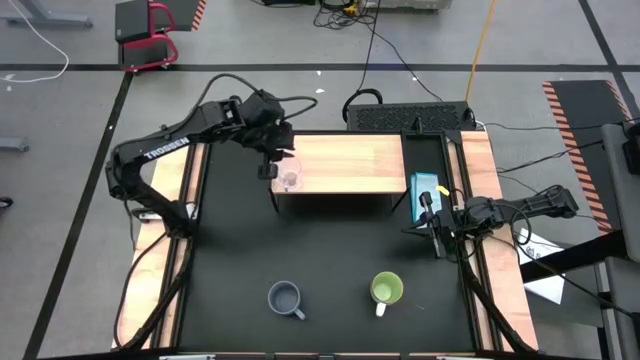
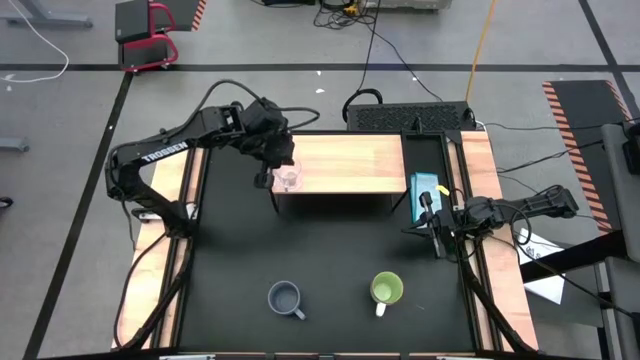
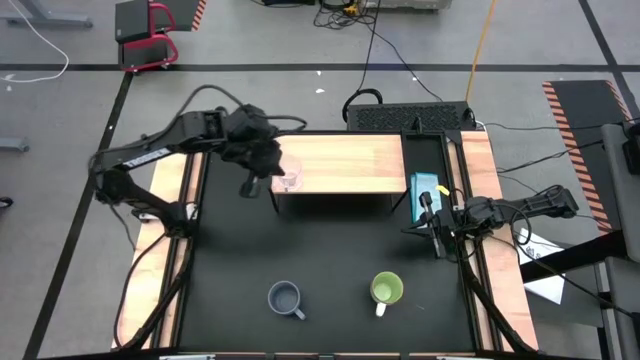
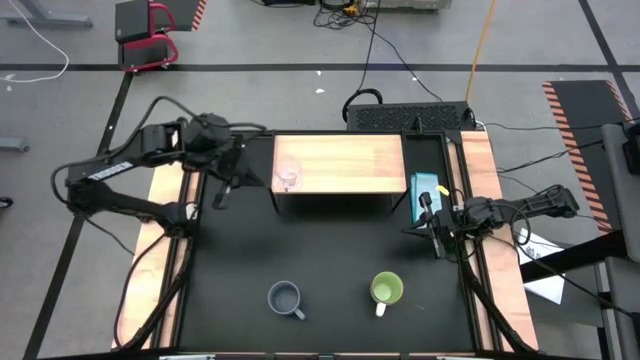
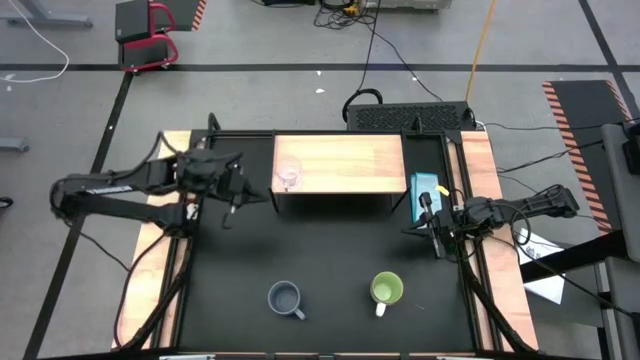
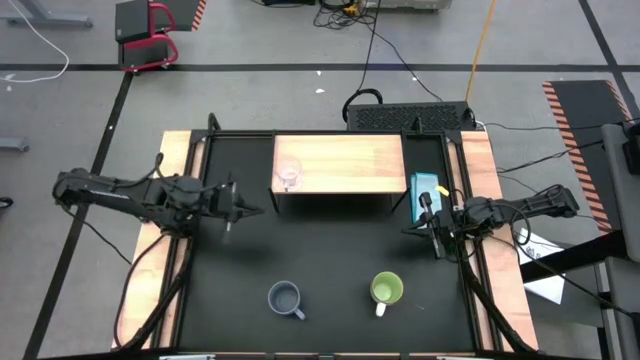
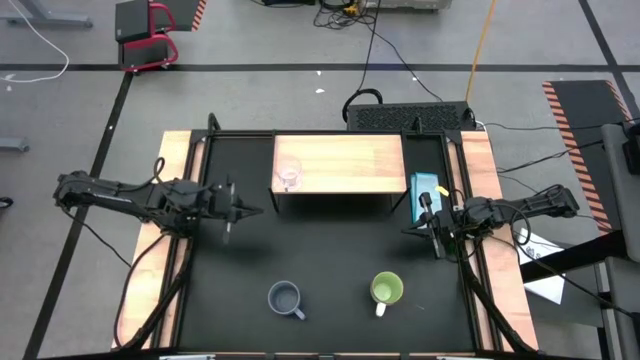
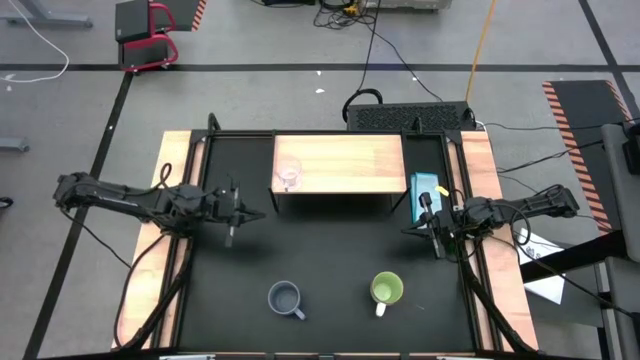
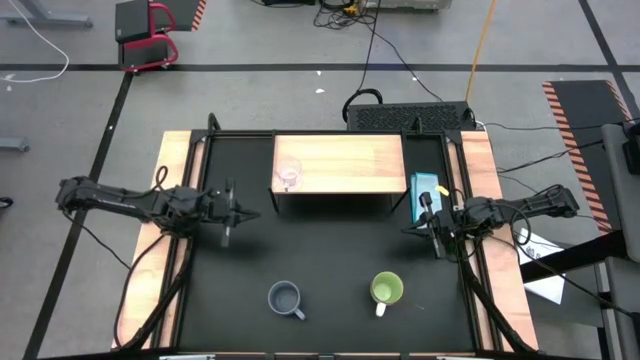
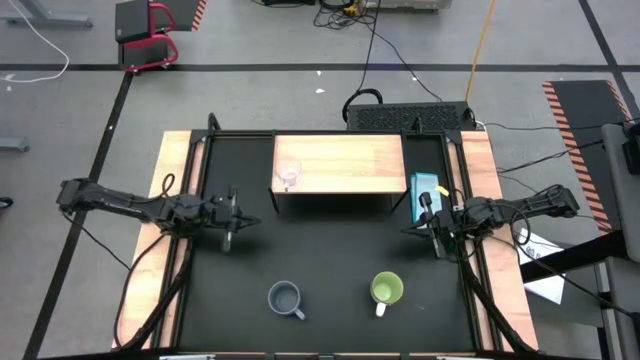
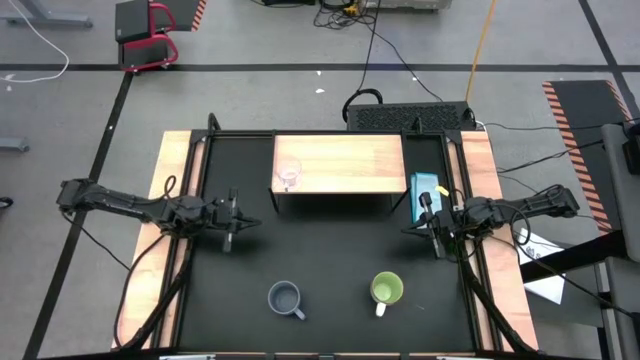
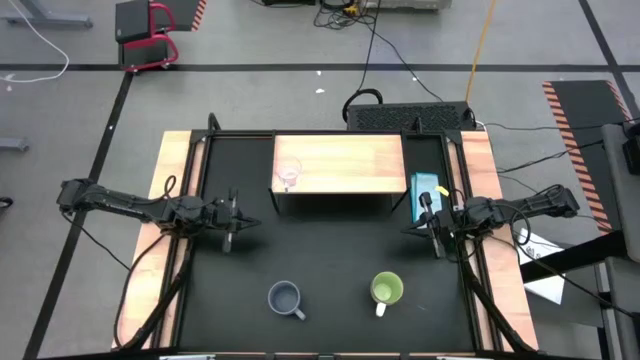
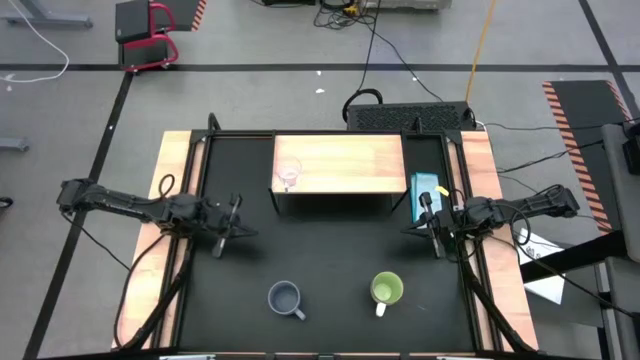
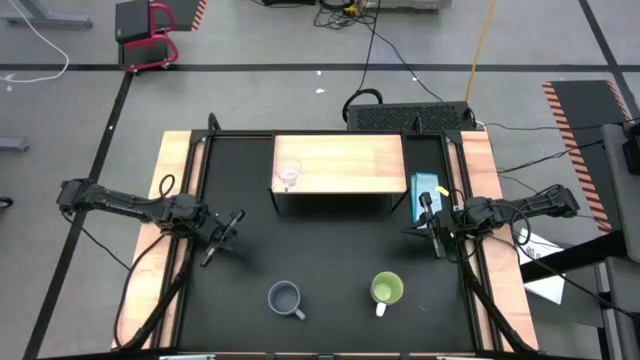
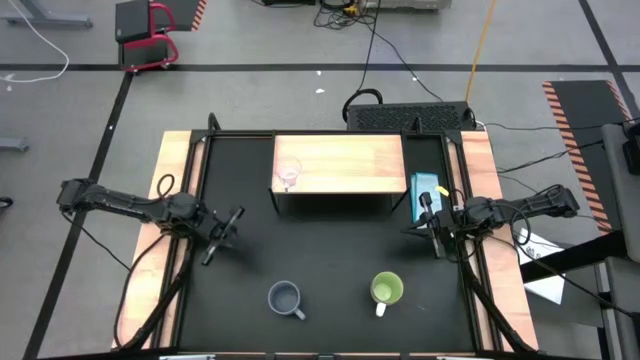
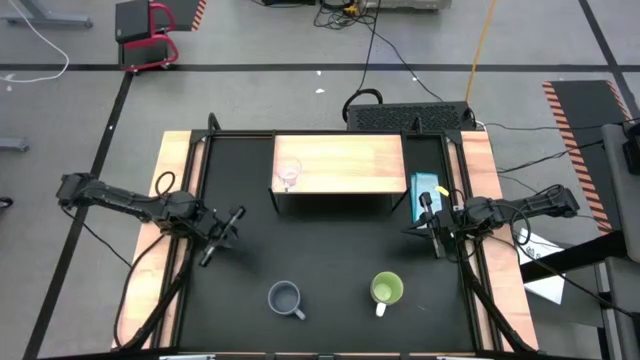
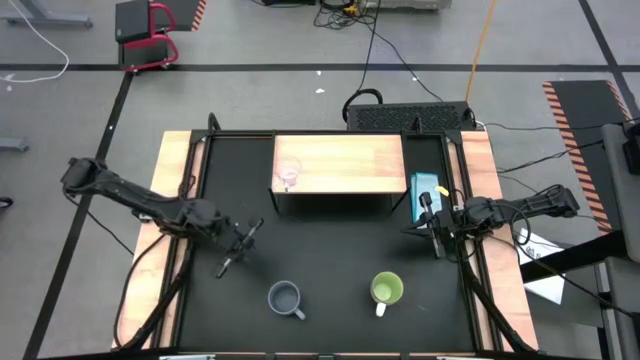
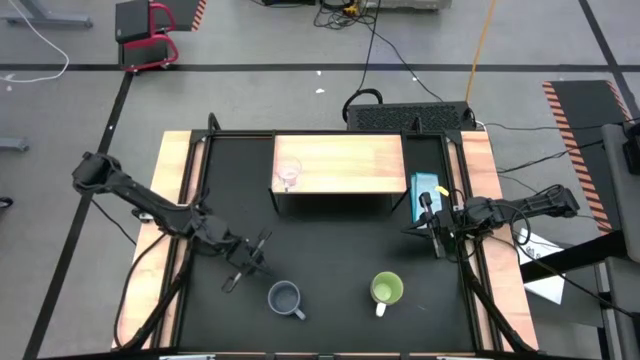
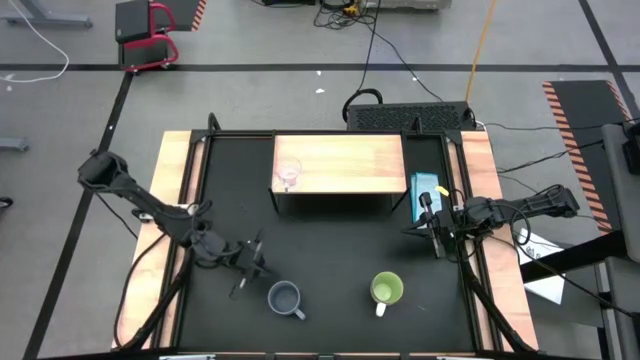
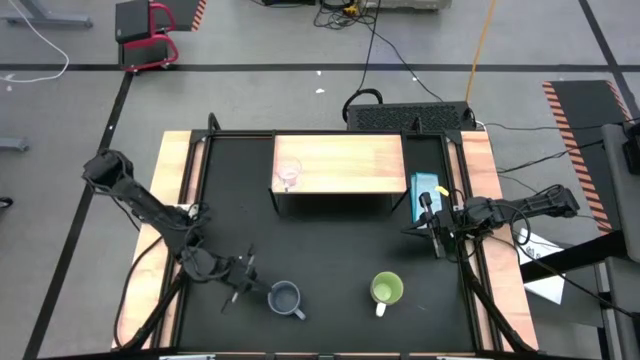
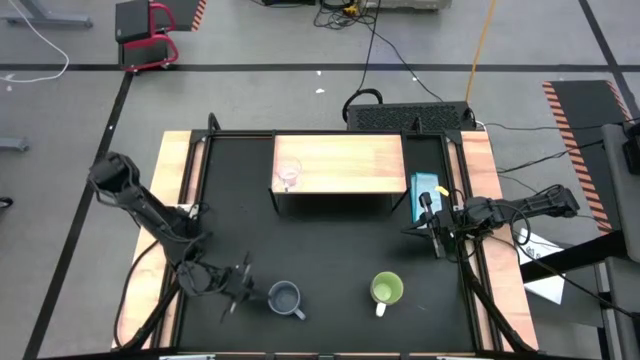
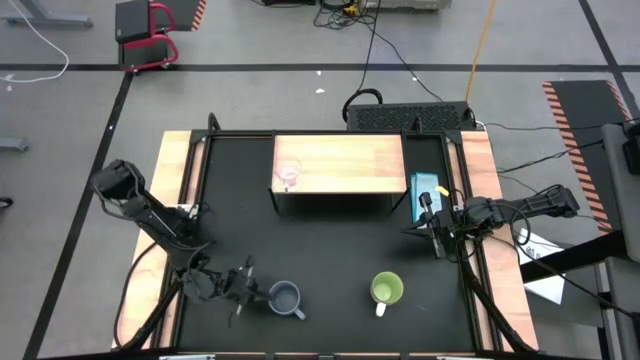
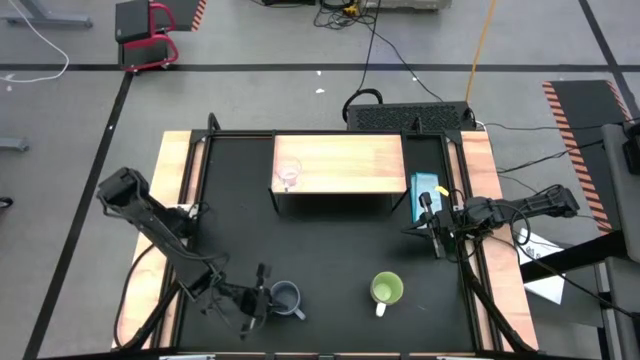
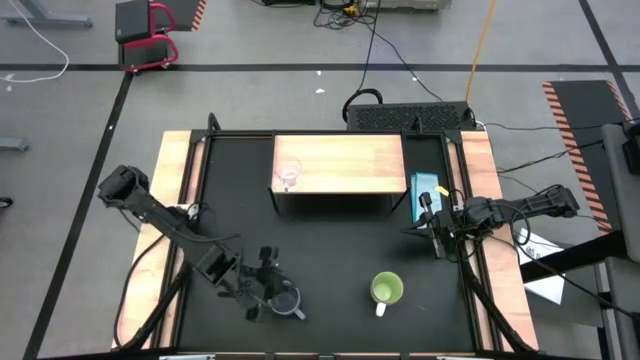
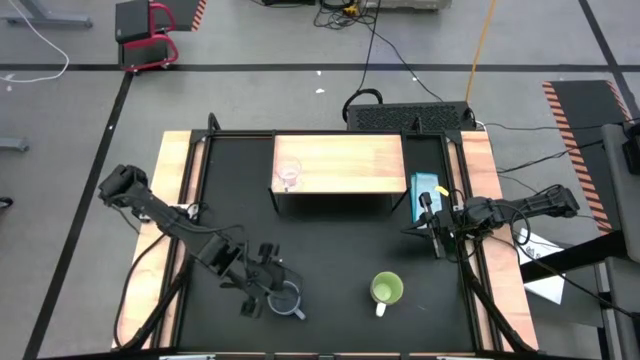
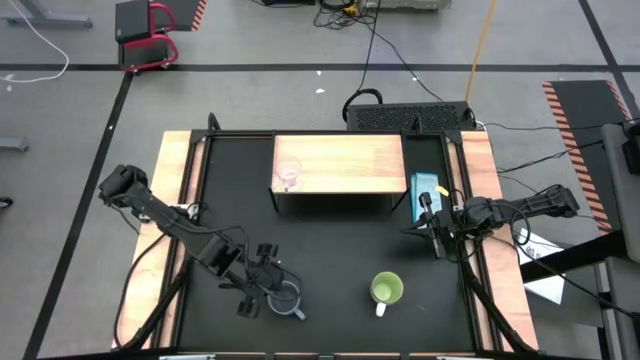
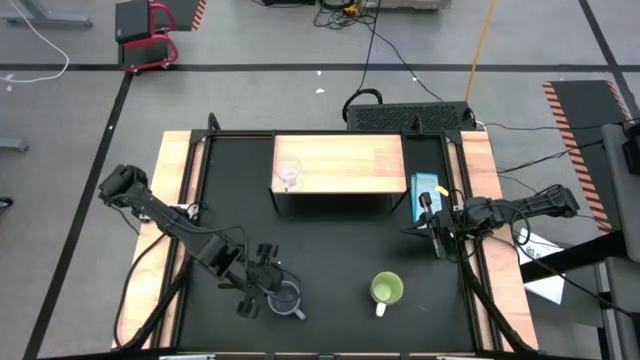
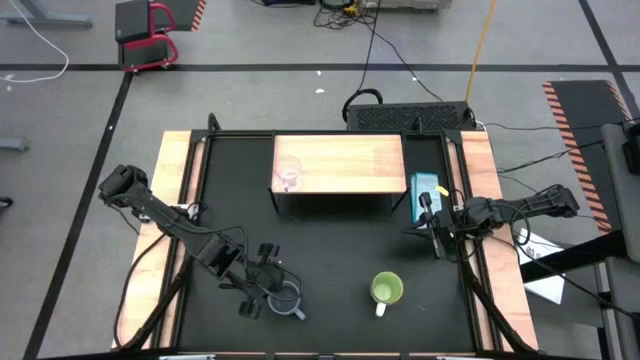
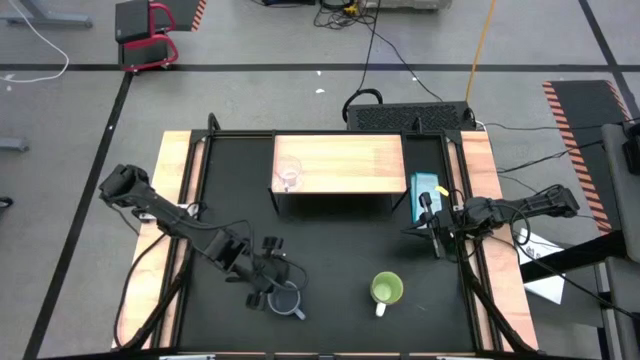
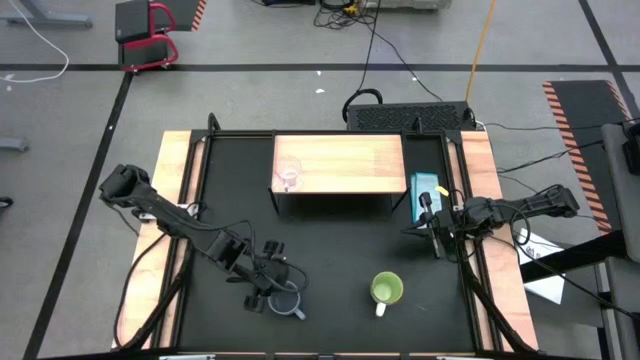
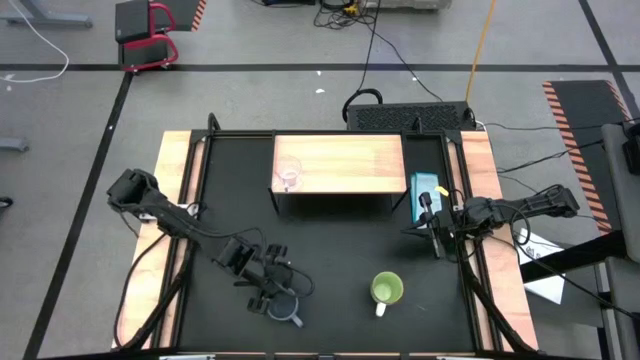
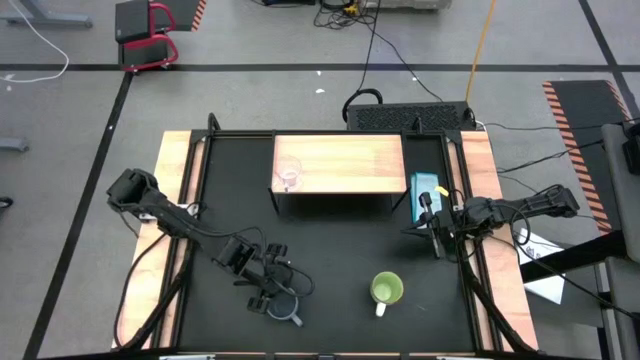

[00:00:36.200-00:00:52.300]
Task: Stack small to large cups/mugs on shelf
Put the gray mug on the shelf

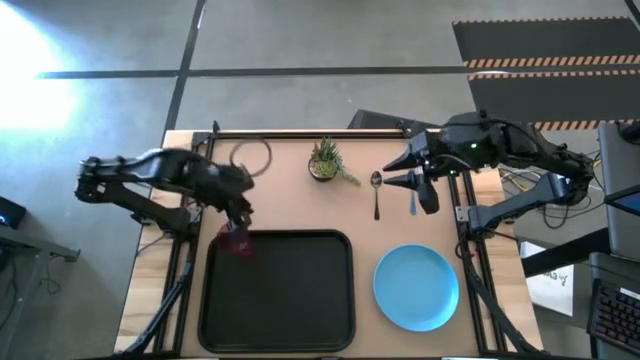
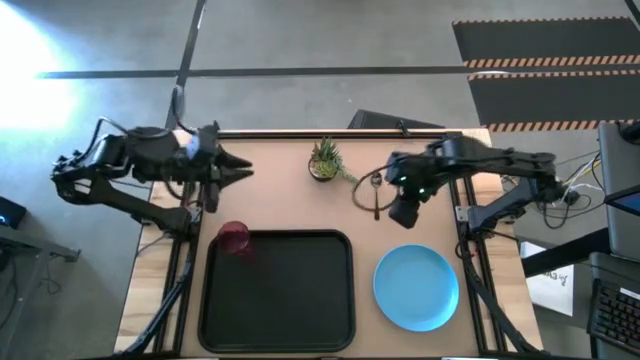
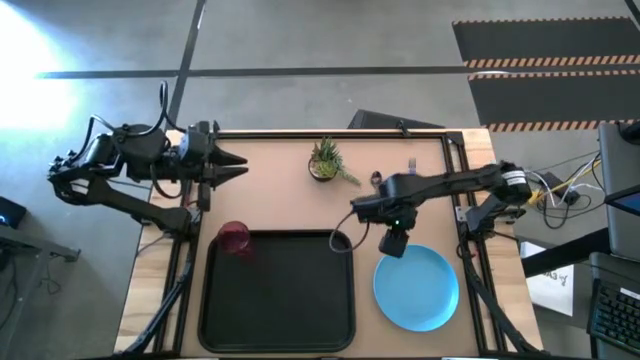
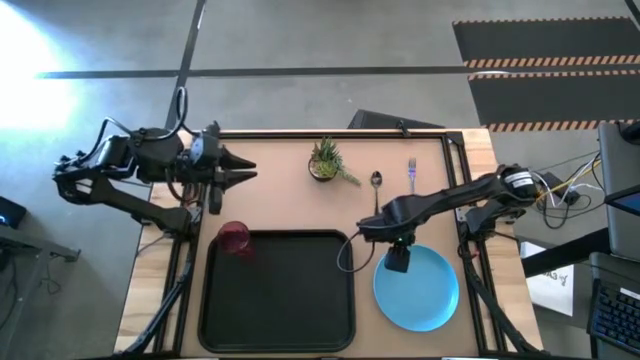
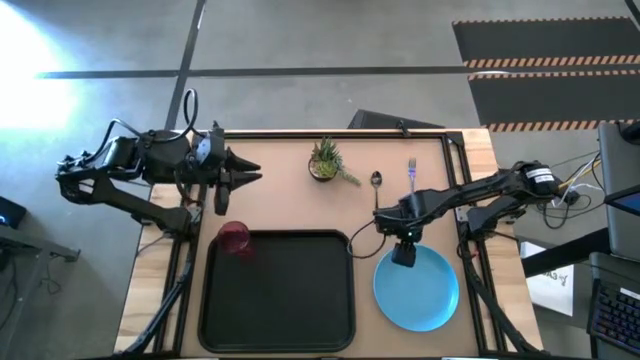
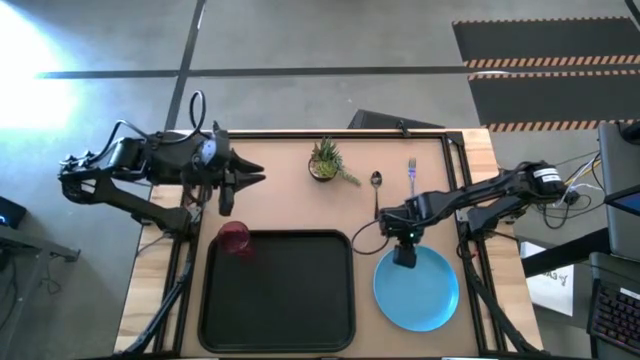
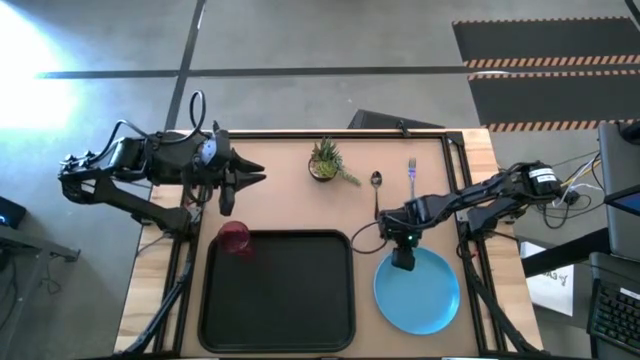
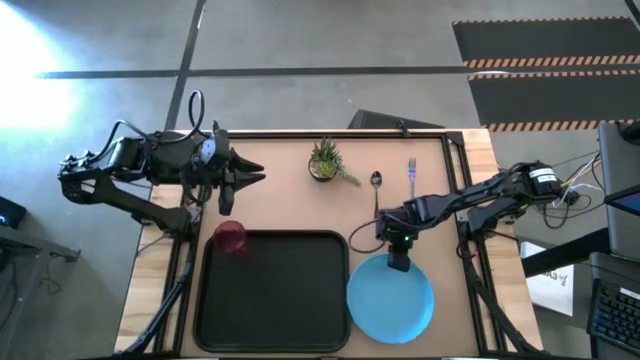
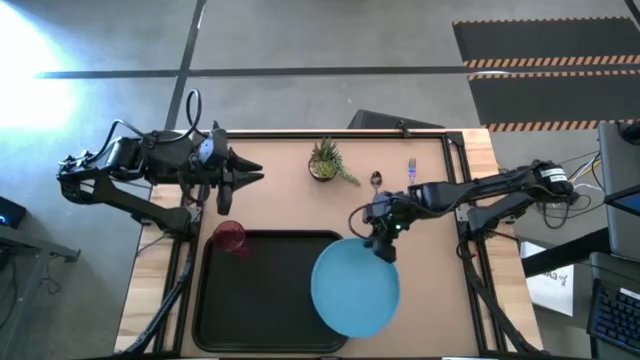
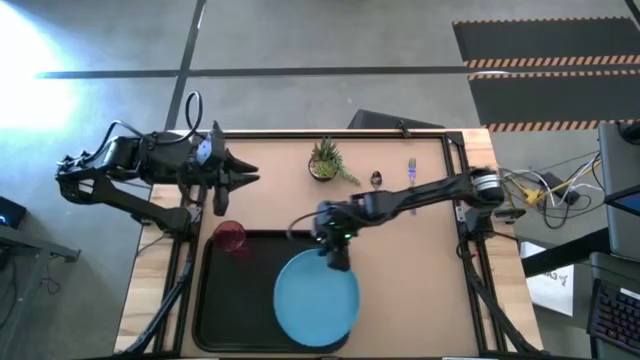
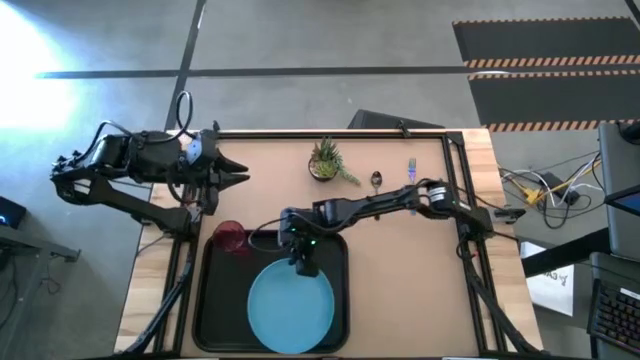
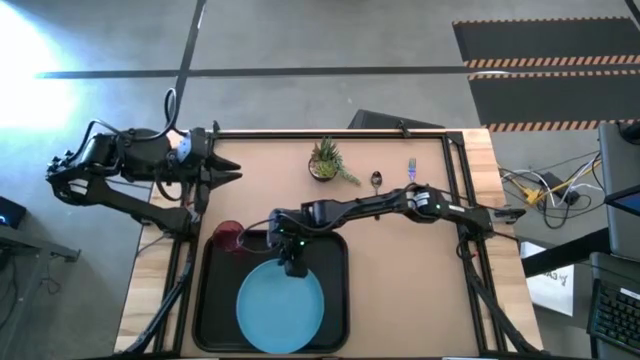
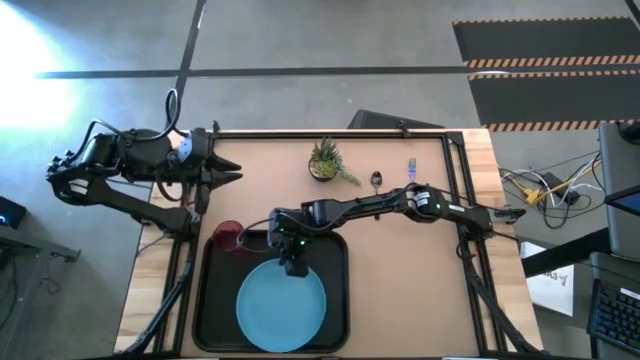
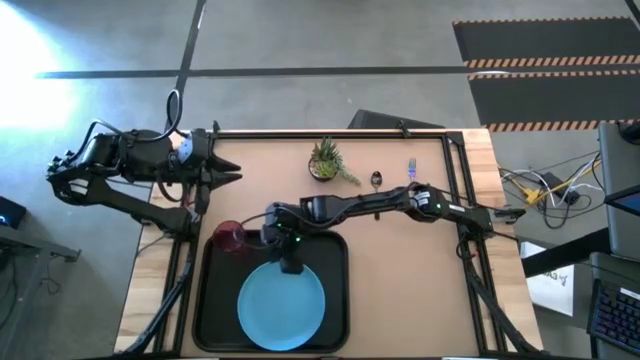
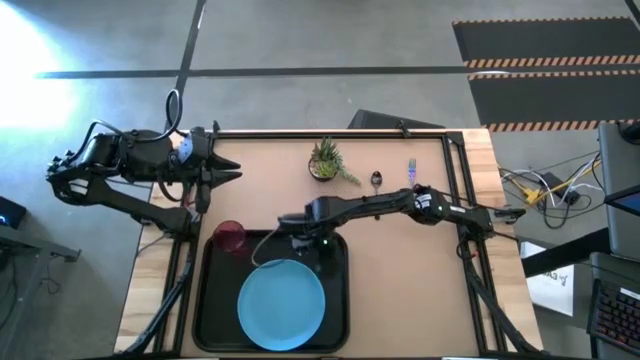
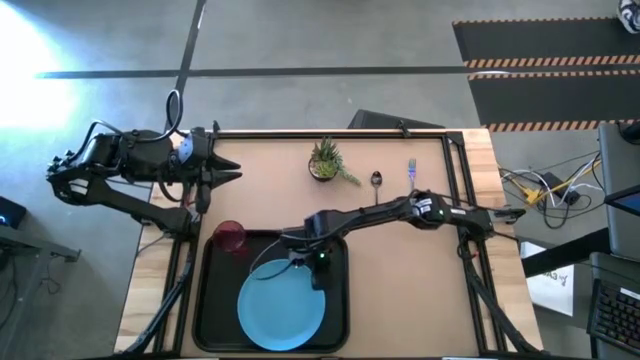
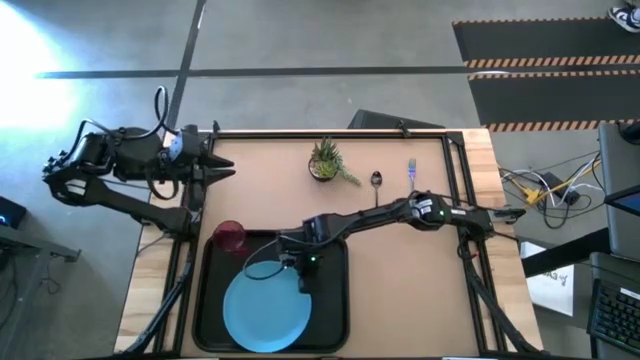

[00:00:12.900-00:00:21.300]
Task: Pick and place plate/cup/fork/spoon on tray
Put the blue plate to the bottom of the purple cup on the black serving tray
